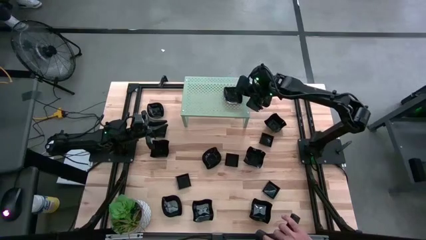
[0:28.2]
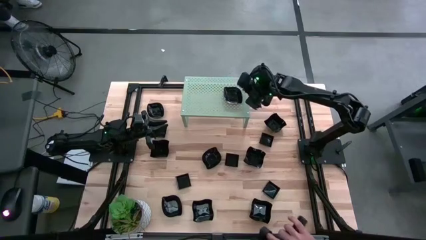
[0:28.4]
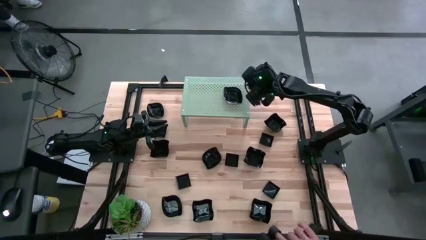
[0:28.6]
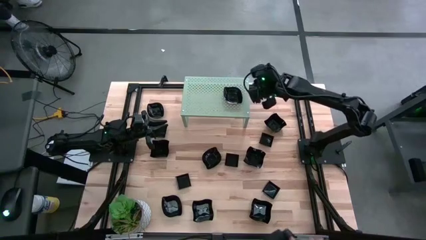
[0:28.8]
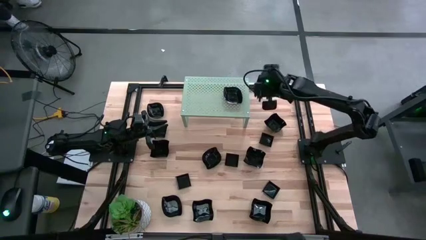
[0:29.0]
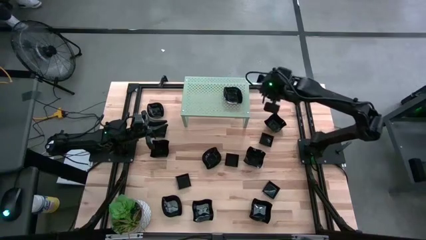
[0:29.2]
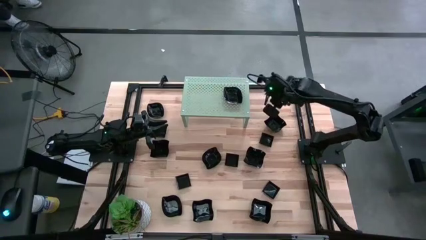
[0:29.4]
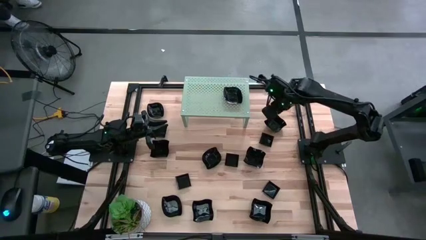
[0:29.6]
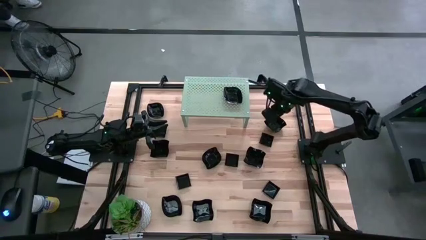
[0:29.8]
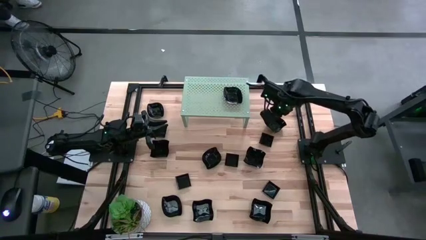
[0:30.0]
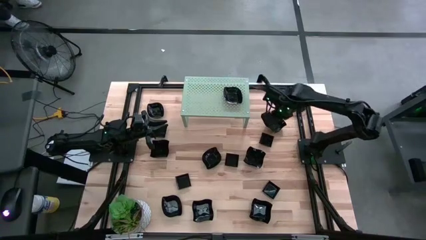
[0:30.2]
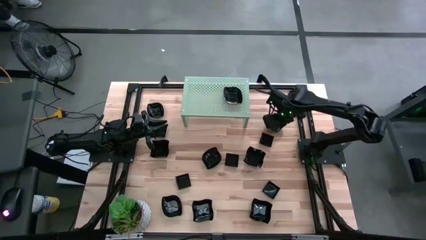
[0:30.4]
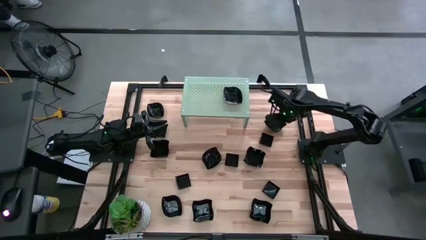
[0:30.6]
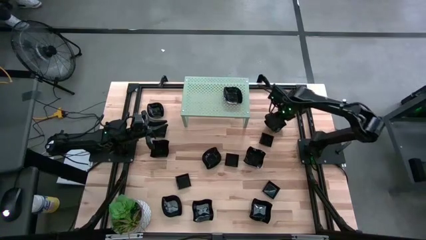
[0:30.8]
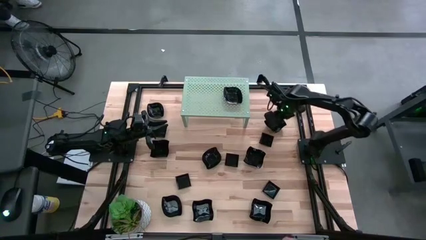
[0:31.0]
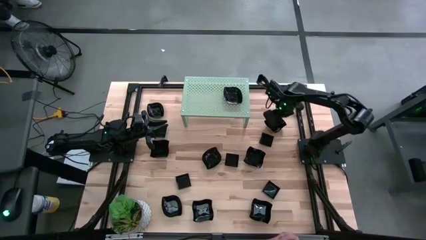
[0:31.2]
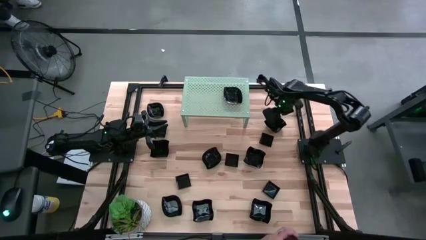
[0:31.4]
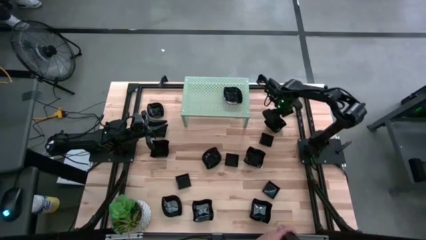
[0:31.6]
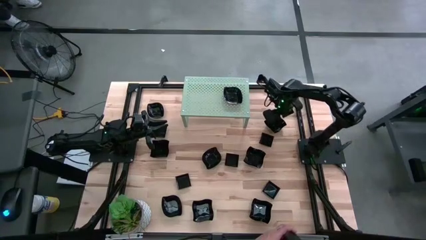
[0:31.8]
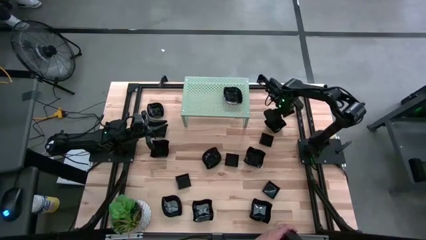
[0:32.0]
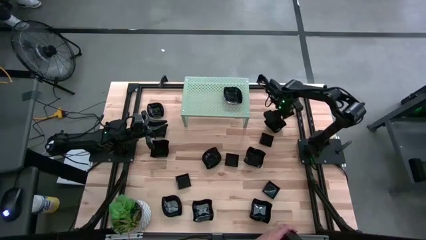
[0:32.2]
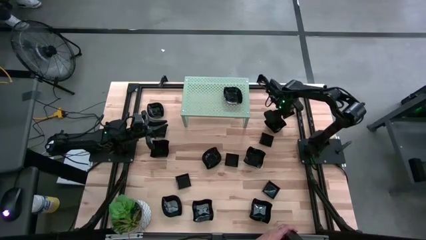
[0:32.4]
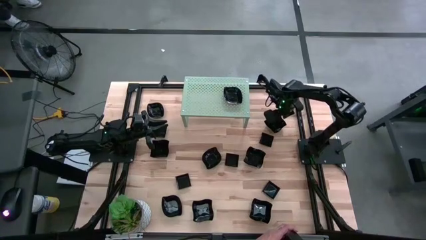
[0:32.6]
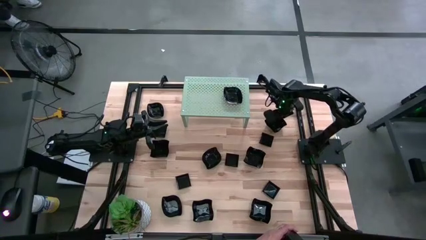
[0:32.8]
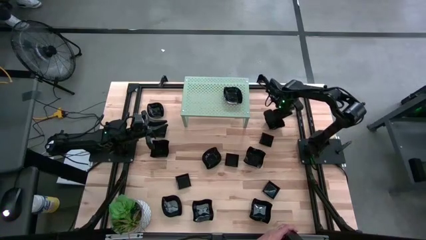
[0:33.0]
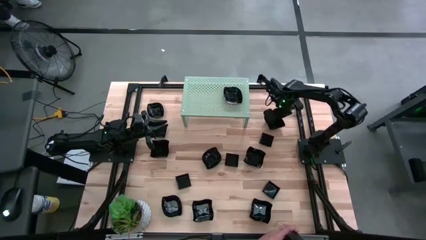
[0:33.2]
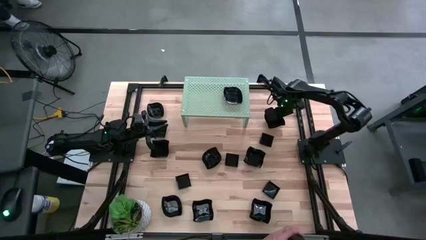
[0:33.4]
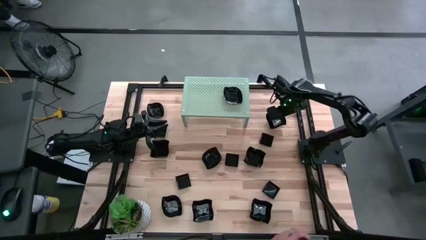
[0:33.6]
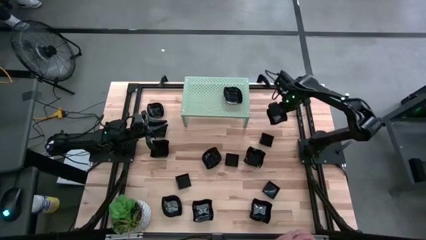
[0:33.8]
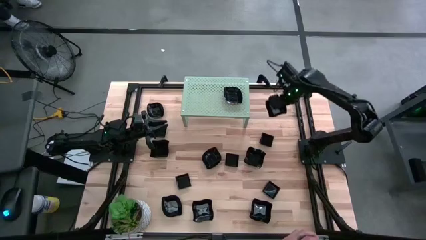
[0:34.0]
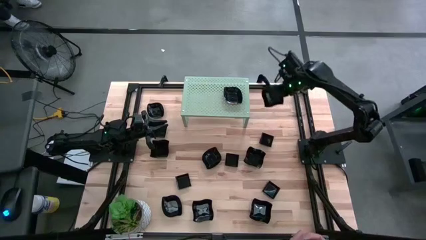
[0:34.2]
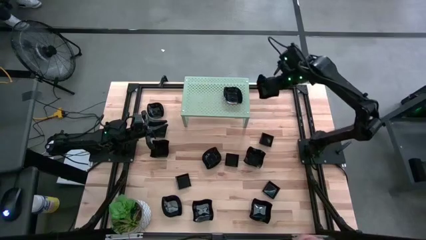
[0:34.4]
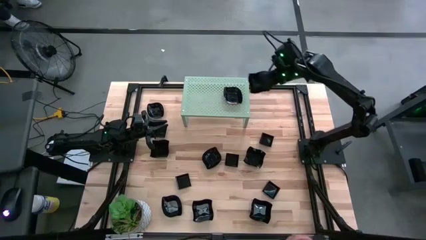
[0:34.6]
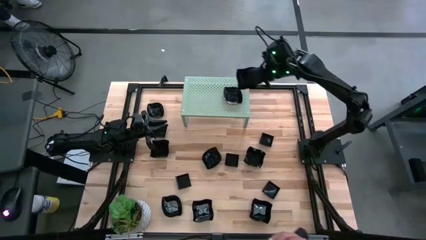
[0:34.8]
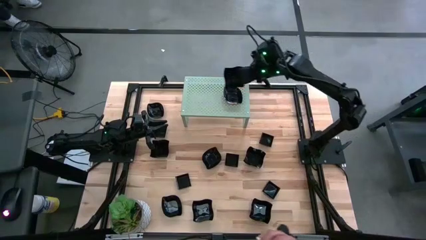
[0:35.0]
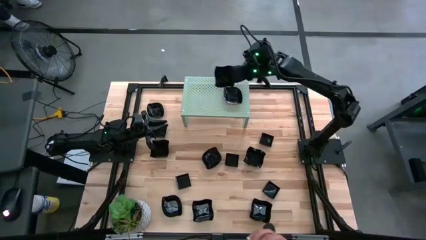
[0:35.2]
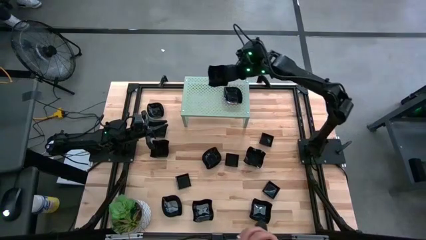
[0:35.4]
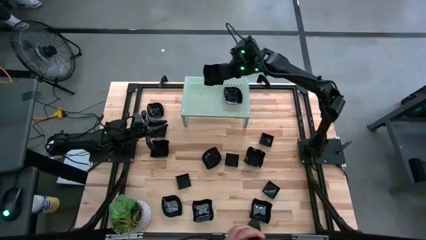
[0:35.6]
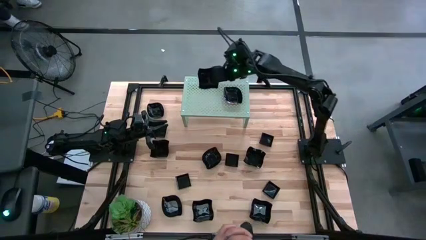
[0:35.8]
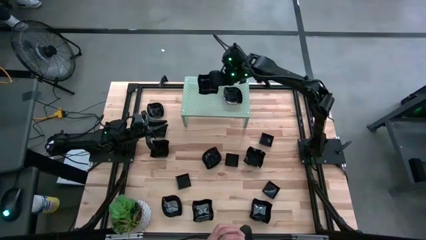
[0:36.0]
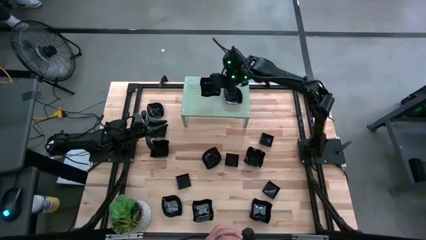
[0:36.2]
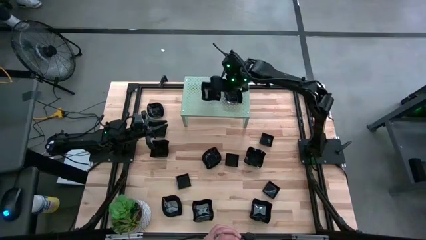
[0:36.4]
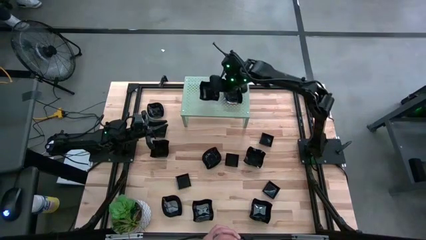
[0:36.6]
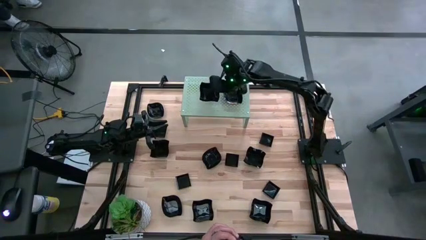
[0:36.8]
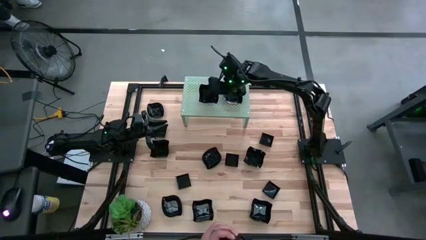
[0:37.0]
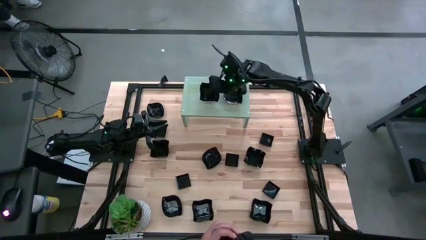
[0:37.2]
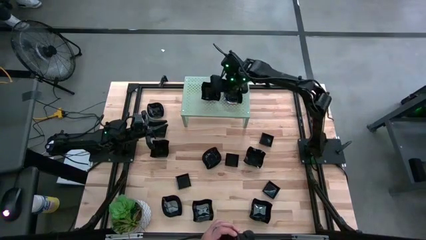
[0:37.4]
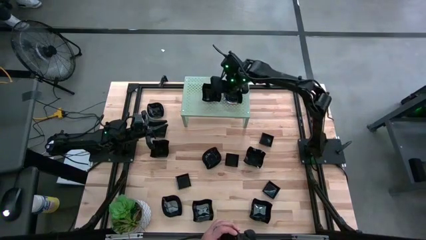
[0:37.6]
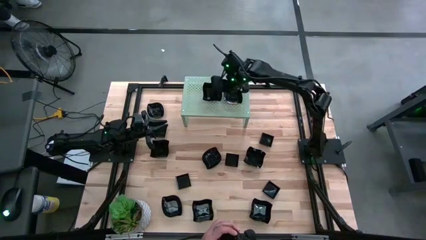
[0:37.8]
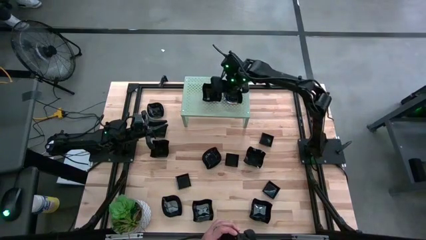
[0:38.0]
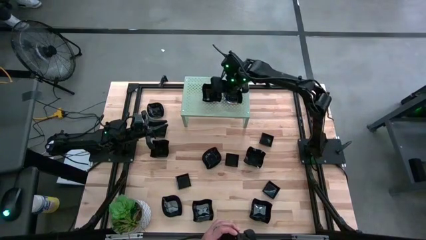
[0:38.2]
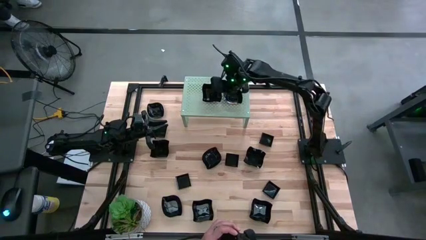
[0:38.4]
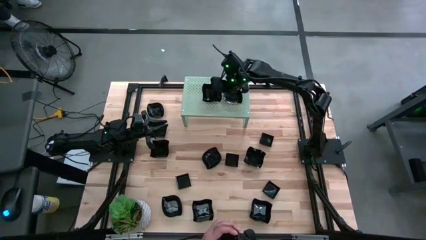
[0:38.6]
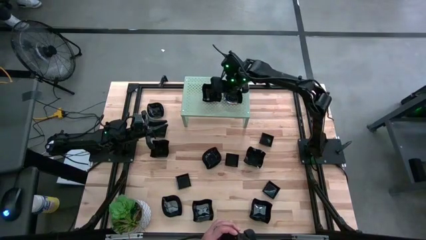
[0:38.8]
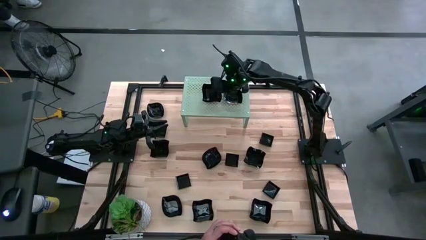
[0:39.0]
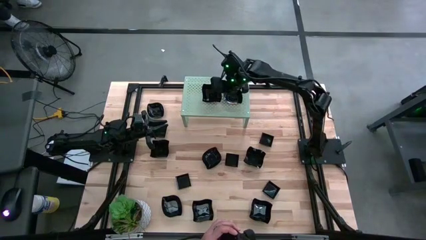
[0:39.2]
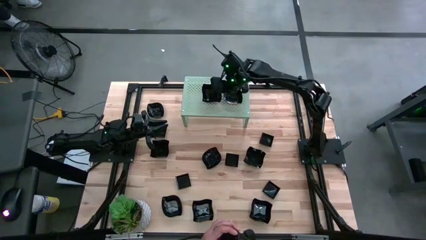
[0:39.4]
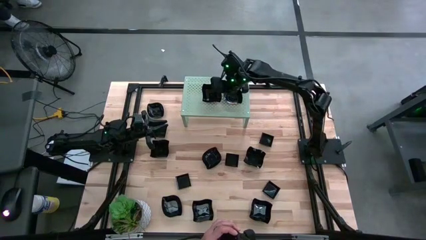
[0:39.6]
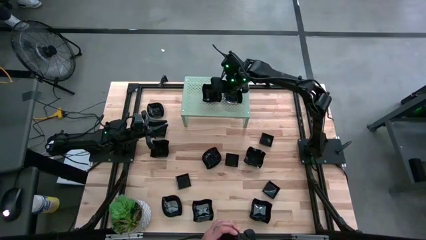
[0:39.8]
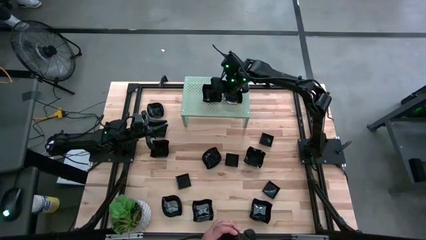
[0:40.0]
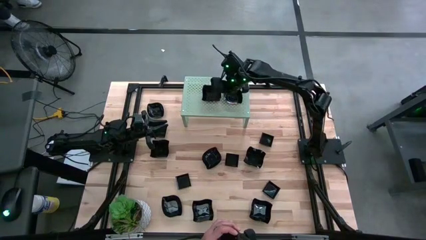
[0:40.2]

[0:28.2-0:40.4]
Task: Pick & Place Mini shaped plates
Put the wave square shaped plate on the shelf
